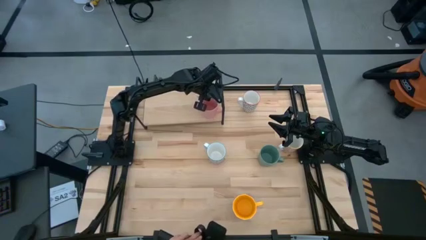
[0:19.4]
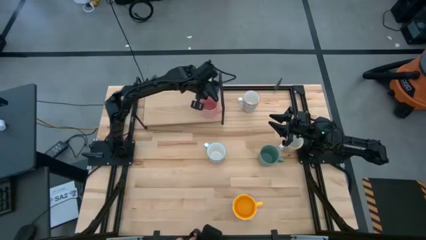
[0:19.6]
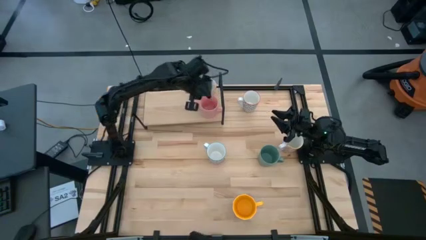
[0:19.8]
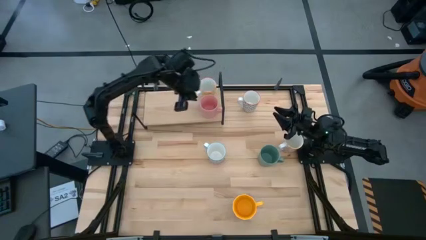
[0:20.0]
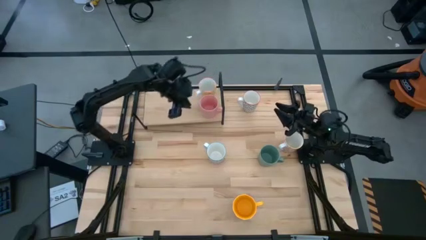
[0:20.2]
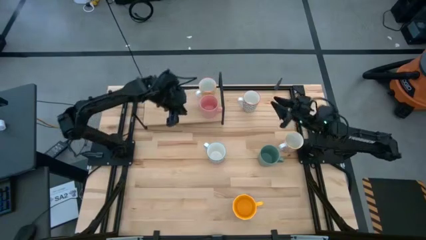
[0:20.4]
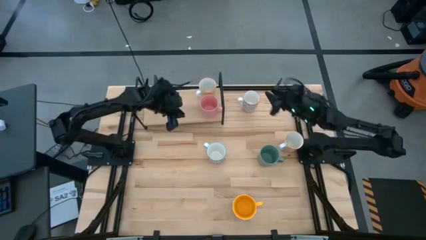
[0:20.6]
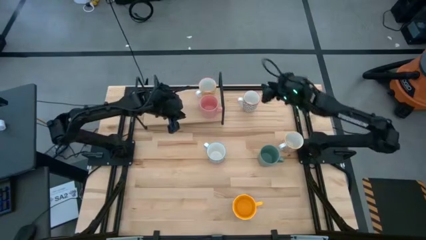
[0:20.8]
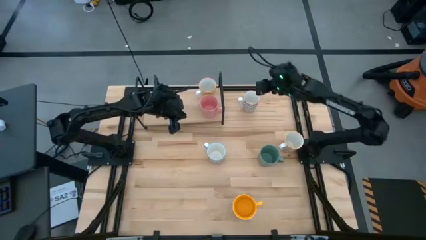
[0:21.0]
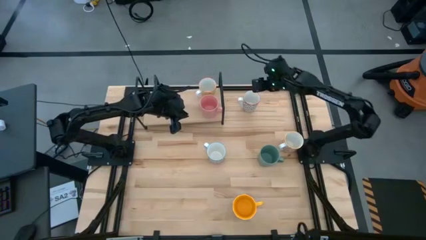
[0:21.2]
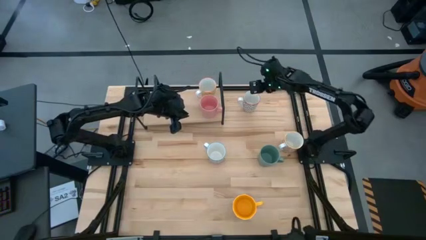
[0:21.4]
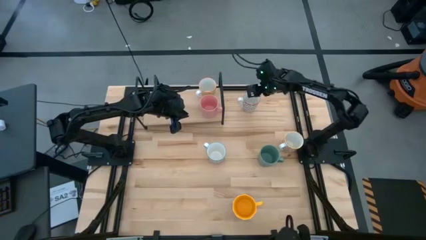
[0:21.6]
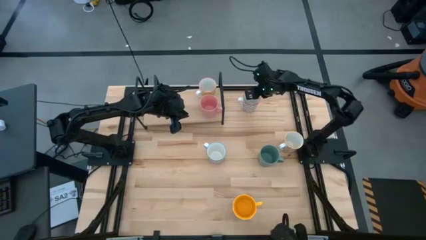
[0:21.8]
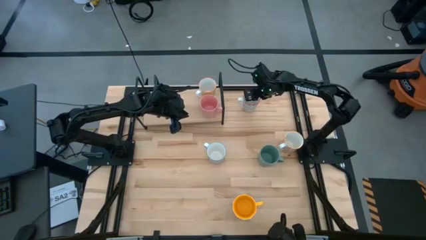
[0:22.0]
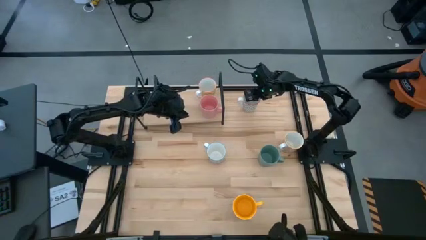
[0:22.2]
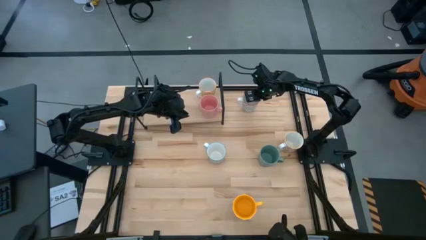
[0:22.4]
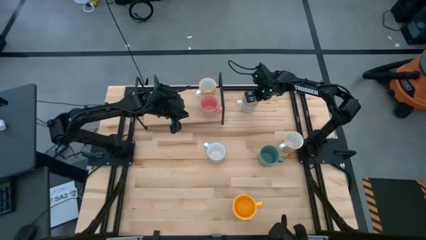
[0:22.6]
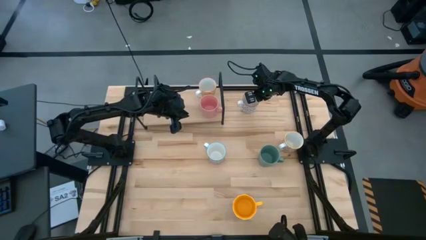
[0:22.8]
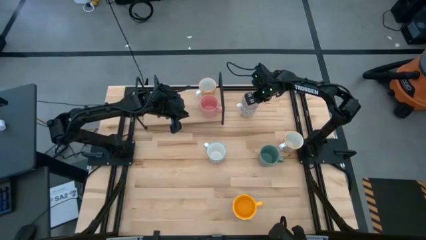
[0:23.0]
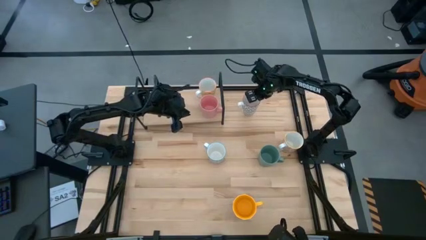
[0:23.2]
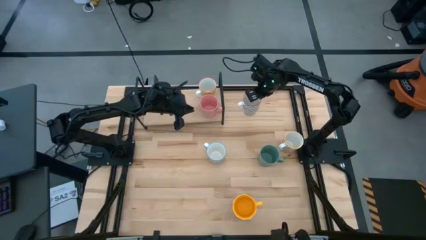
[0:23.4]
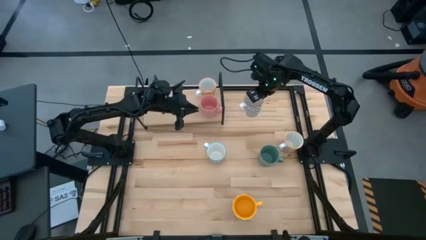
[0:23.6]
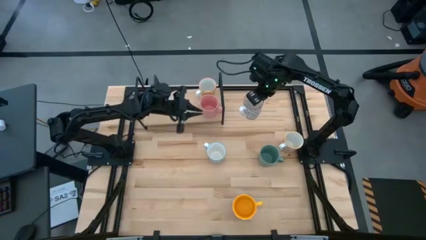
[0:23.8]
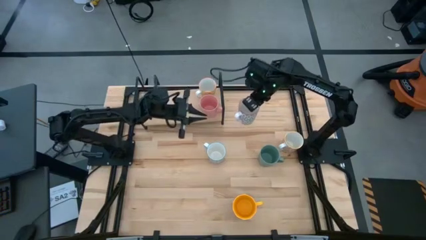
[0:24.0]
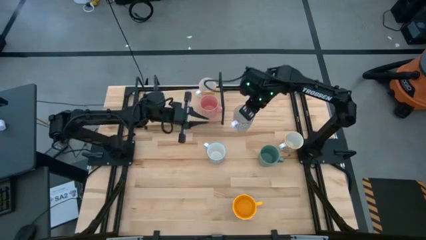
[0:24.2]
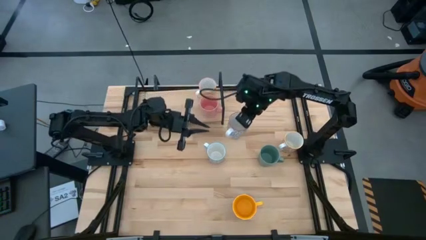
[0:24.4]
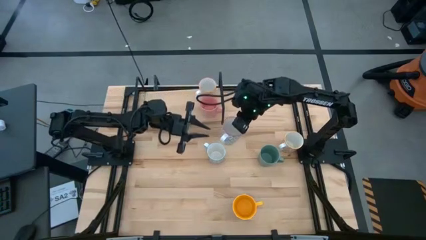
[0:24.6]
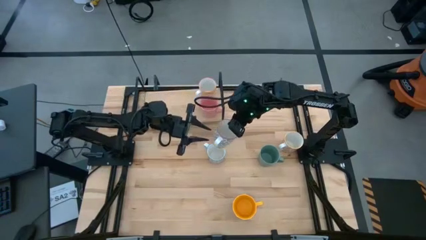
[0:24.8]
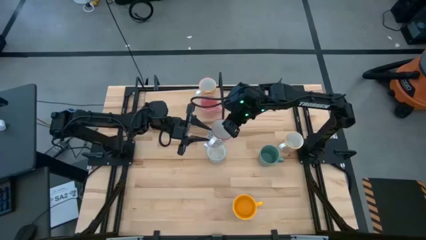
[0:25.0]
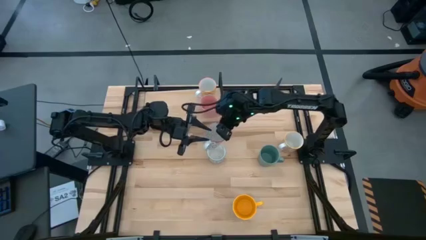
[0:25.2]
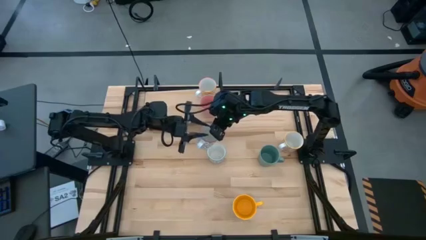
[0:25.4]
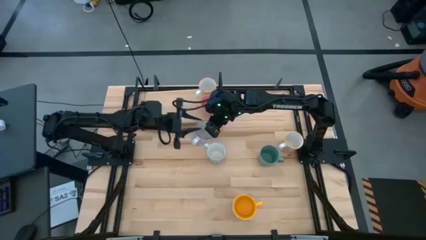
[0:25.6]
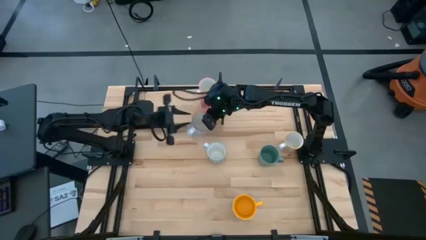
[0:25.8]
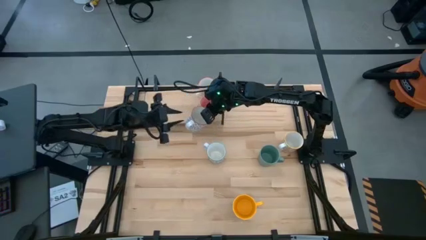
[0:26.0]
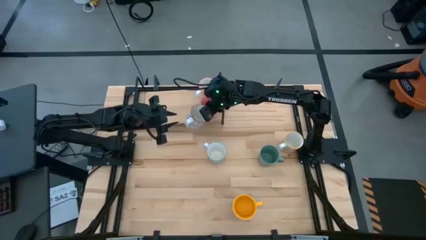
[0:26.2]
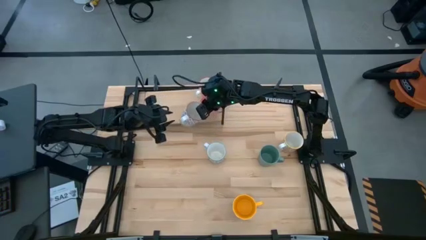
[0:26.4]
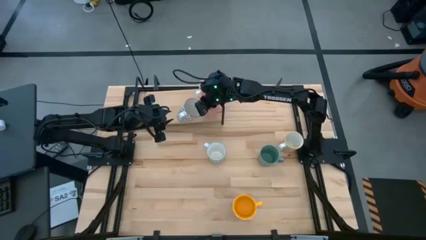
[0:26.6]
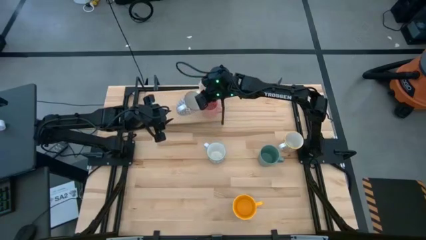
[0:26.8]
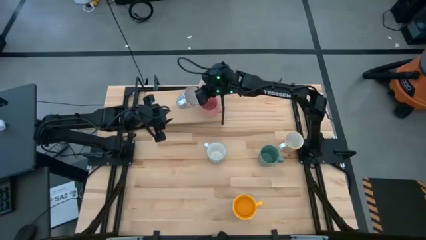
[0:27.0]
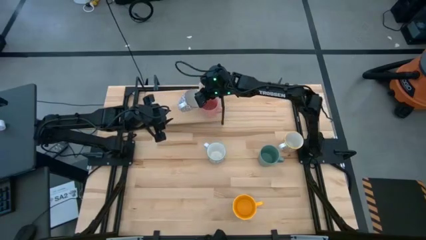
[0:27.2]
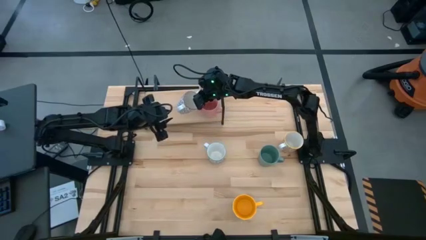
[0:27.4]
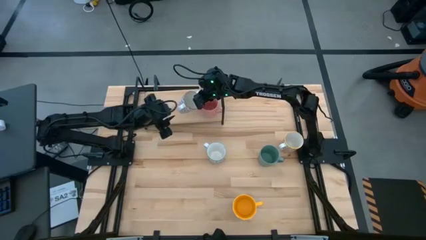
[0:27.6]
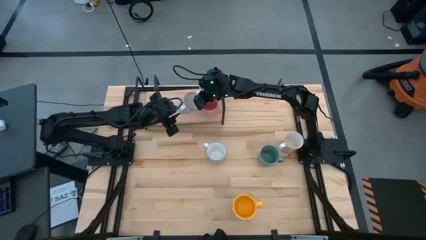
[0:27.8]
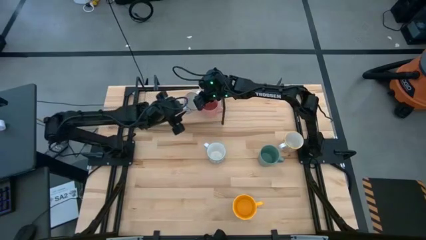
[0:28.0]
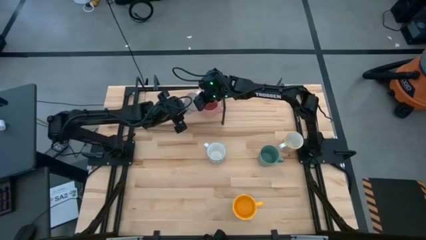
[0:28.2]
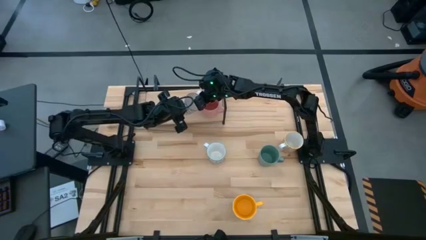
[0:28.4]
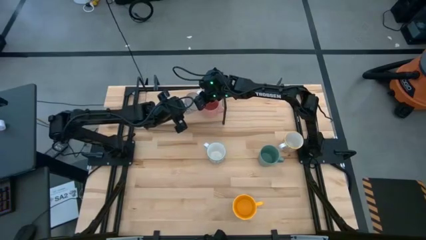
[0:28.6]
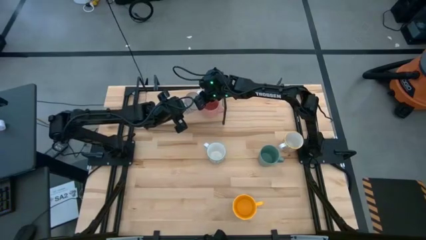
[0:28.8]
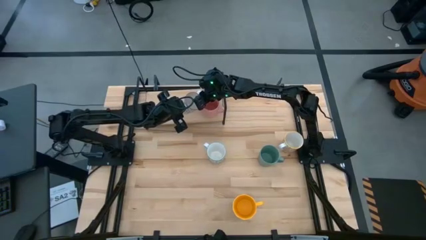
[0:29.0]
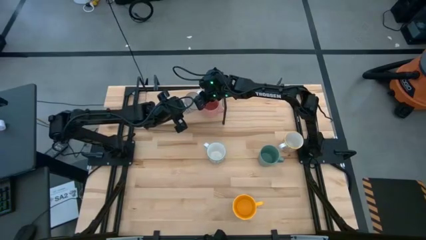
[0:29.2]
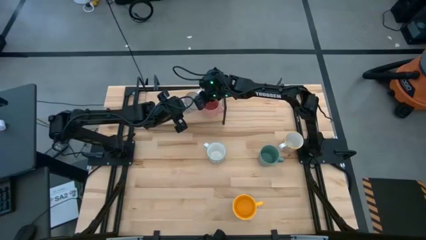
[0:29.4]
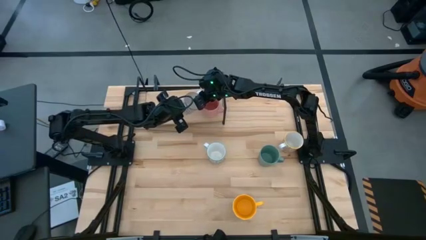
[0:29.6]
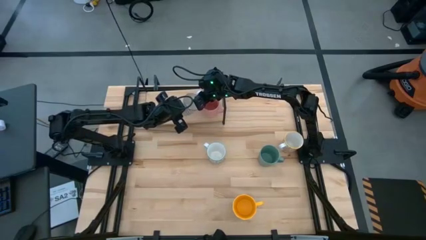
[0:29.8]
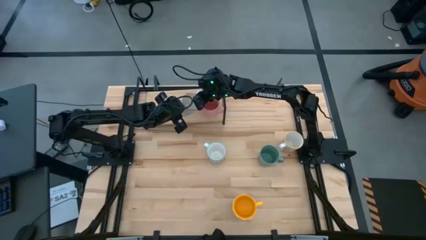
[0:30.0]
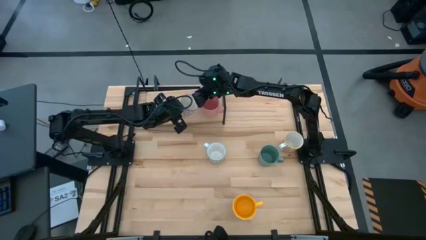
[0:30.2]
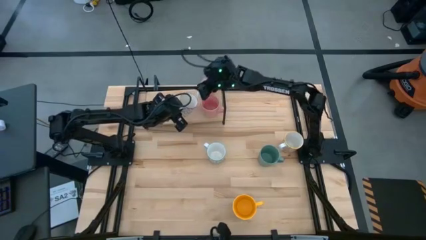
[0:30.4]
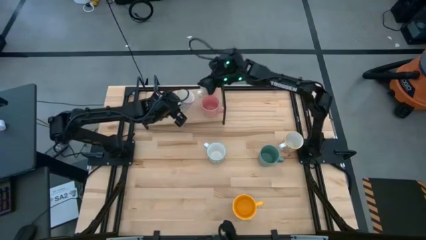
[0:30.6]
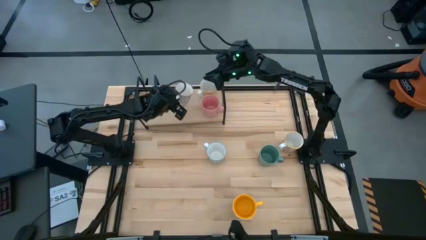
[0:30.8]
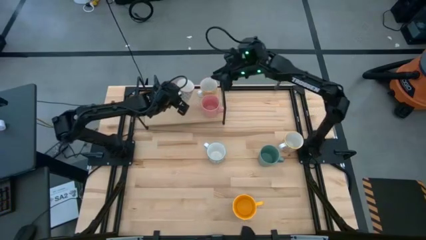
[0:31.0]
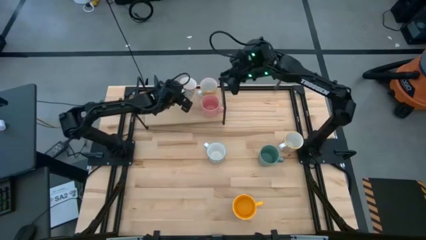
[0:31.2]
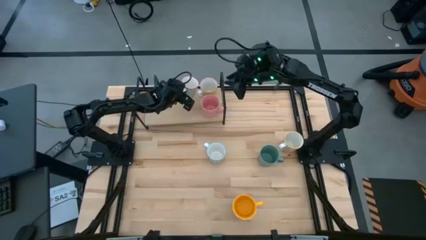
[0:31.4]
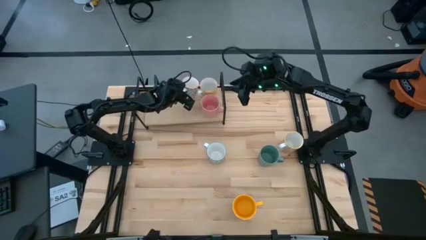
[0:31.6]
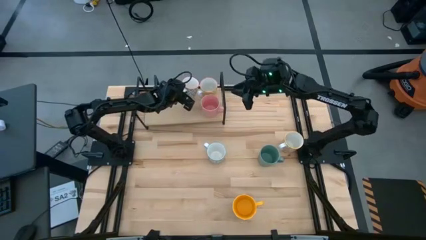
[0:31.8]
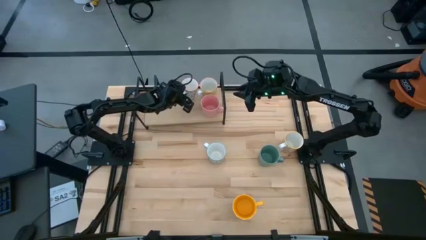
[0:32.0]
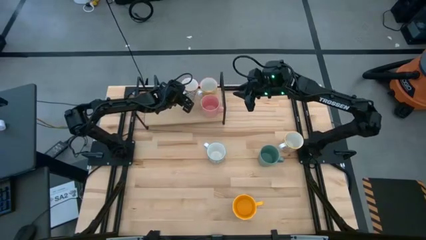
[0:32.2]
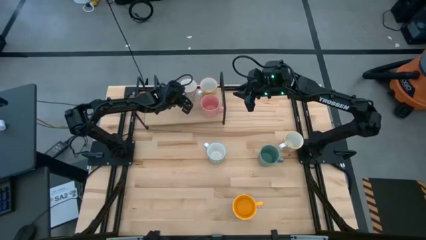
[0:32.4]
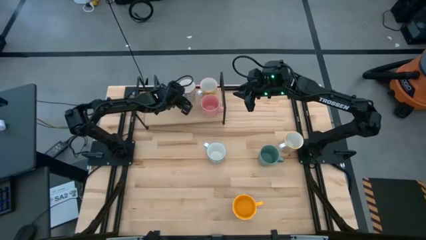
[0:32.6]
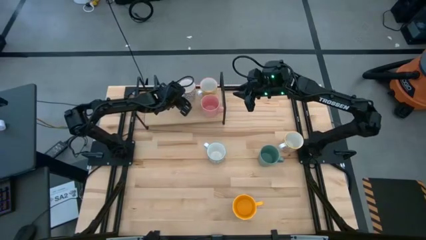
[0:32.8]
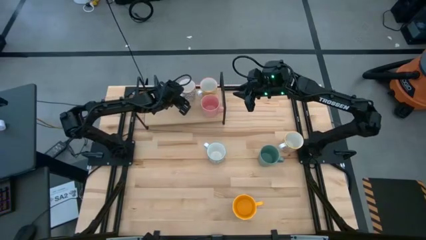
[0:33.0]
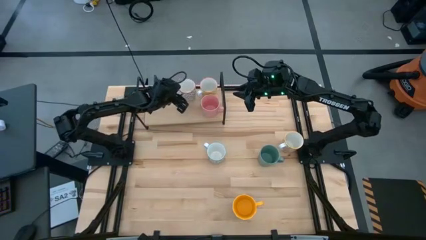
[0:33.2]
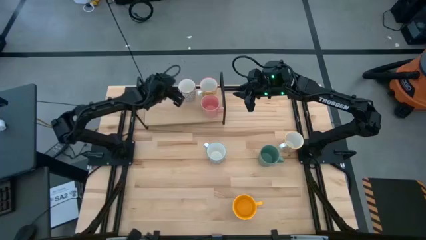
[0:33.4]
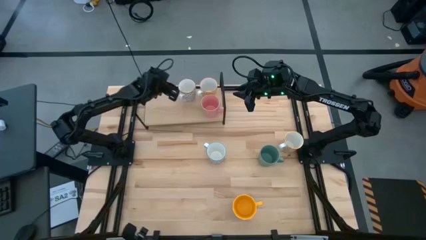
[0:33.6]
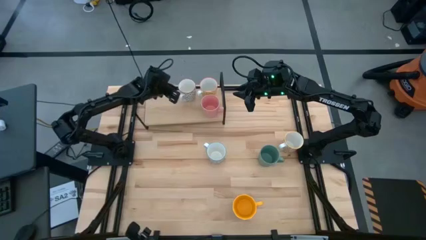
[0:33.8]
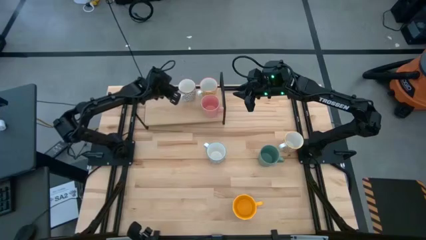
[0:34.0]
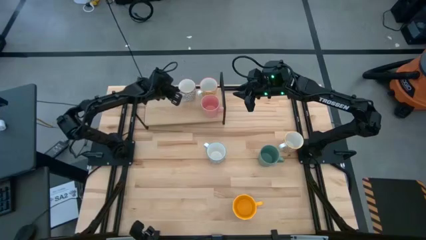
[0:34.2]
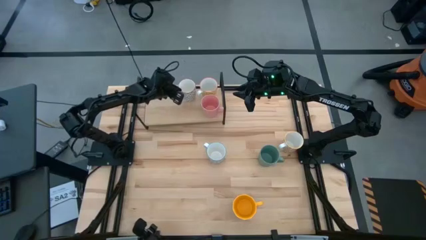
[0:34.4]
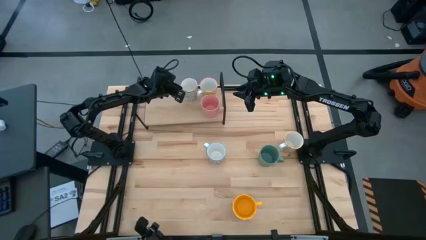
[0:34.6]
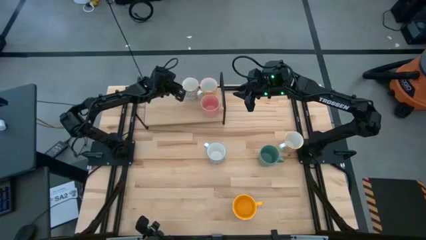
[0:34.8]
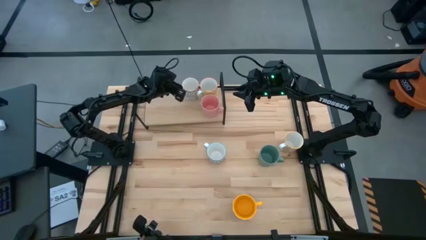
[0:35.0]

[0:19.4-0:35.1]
Task: Place coffee mugs
Put the gray patterned mug on the shelf
